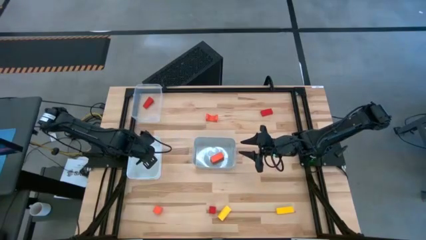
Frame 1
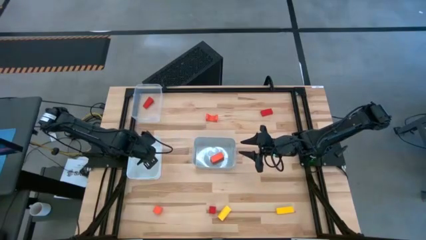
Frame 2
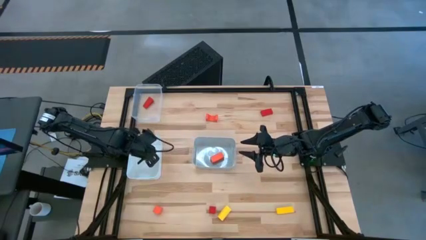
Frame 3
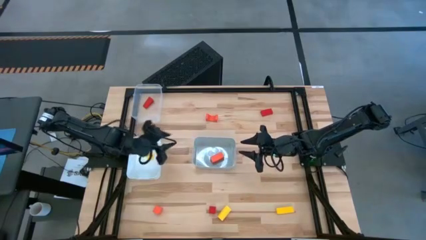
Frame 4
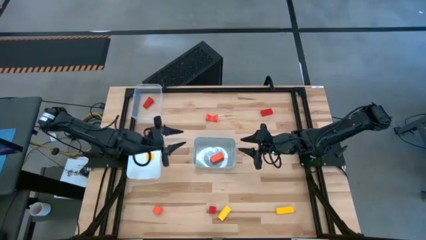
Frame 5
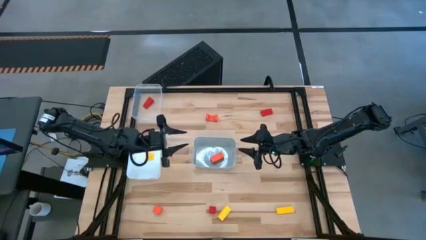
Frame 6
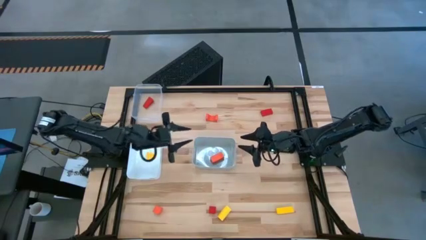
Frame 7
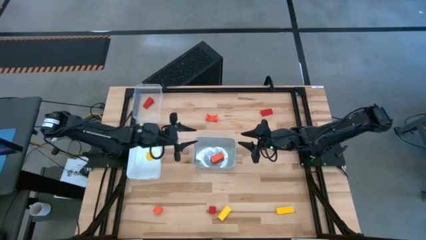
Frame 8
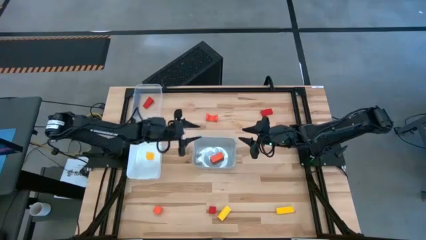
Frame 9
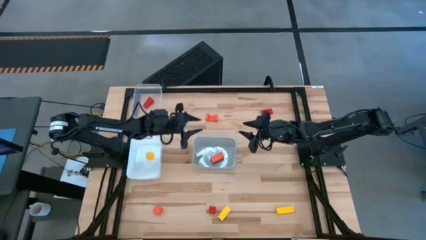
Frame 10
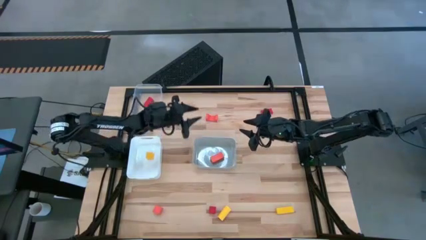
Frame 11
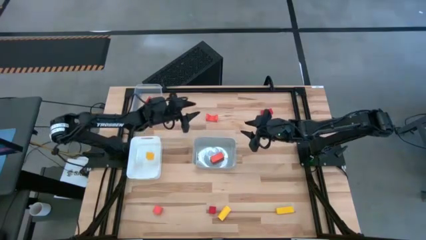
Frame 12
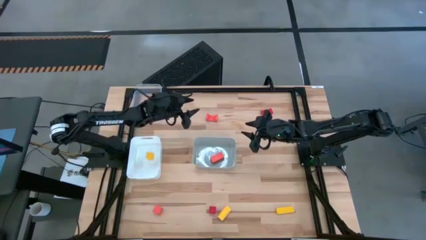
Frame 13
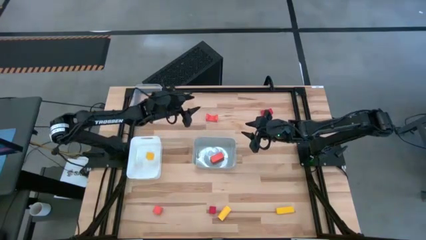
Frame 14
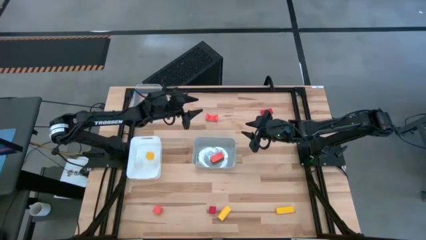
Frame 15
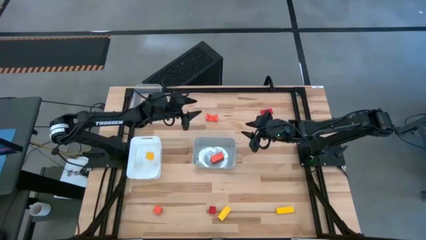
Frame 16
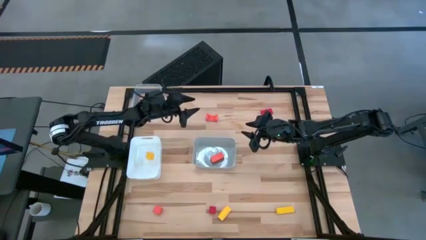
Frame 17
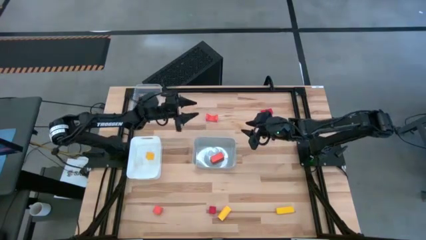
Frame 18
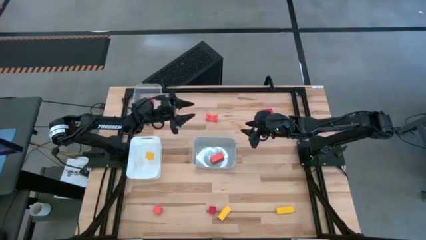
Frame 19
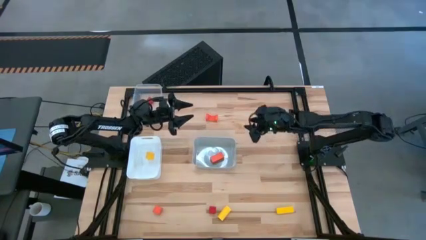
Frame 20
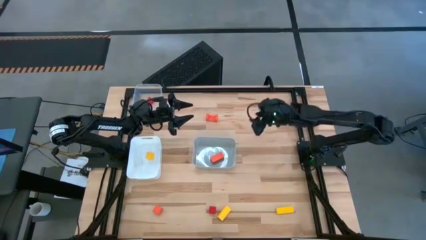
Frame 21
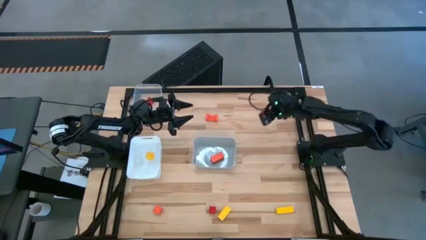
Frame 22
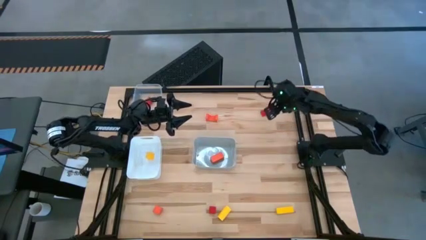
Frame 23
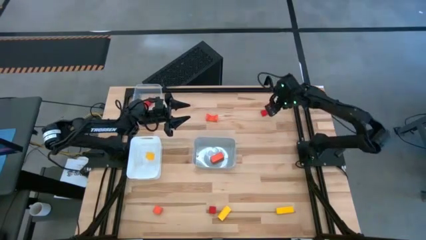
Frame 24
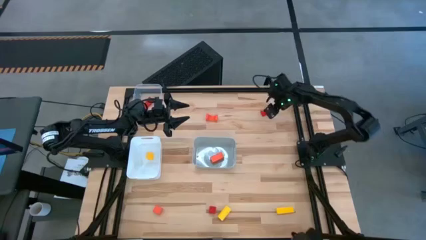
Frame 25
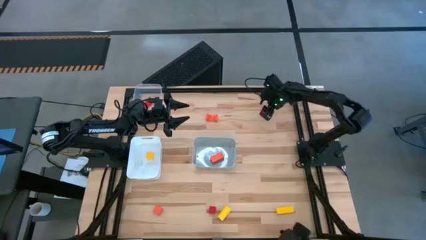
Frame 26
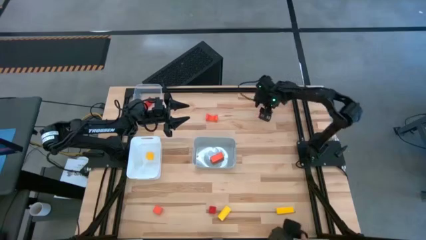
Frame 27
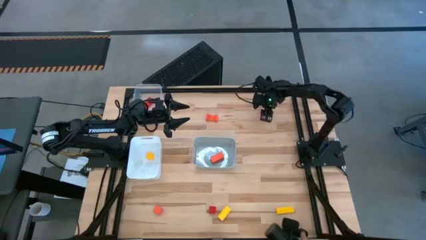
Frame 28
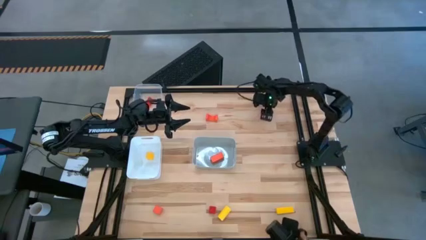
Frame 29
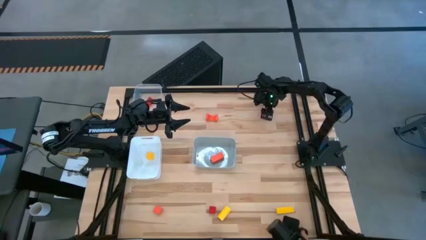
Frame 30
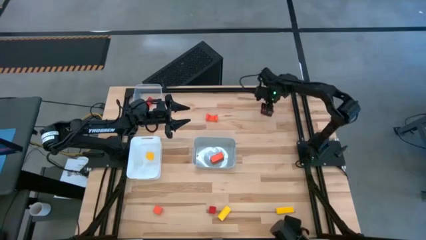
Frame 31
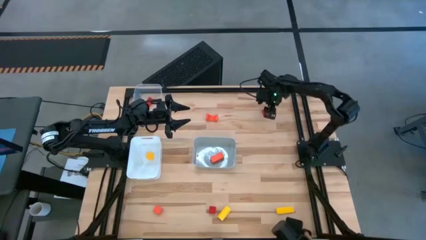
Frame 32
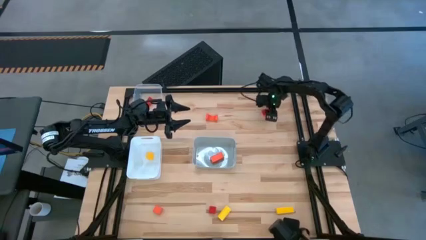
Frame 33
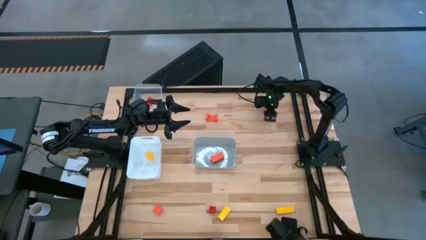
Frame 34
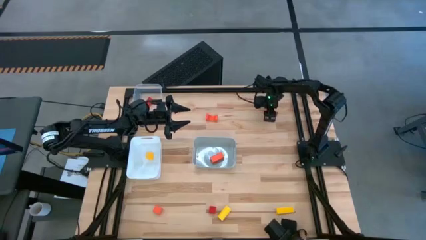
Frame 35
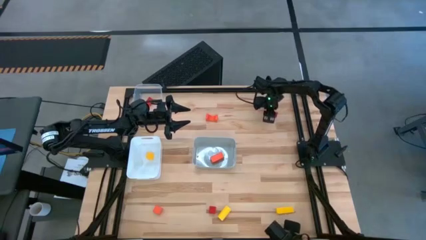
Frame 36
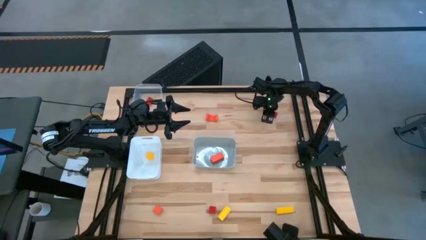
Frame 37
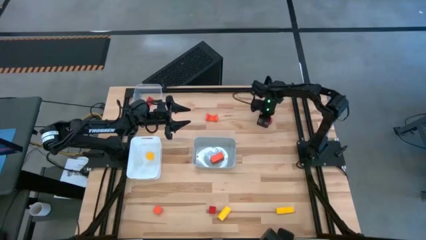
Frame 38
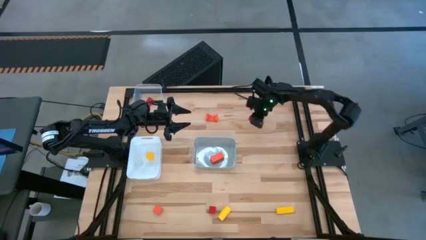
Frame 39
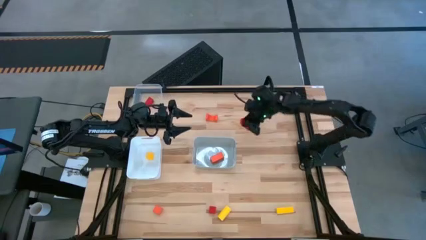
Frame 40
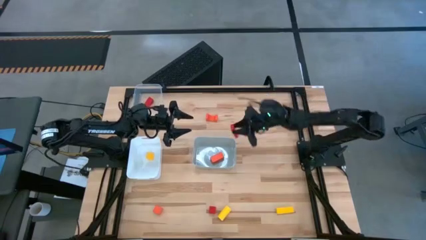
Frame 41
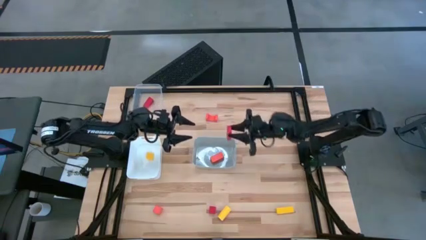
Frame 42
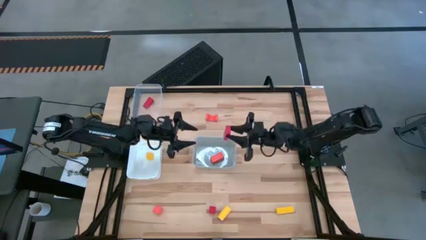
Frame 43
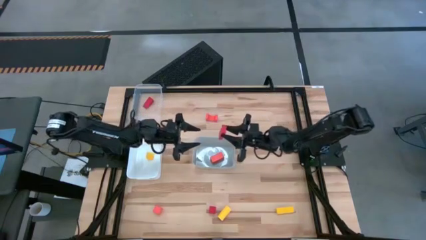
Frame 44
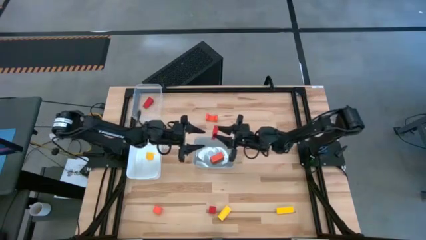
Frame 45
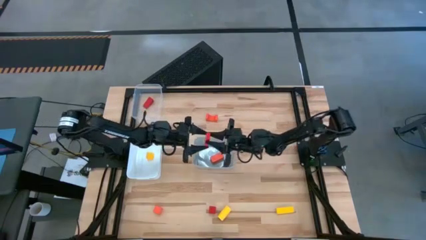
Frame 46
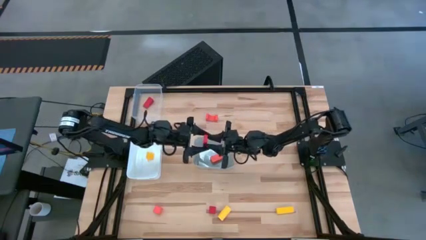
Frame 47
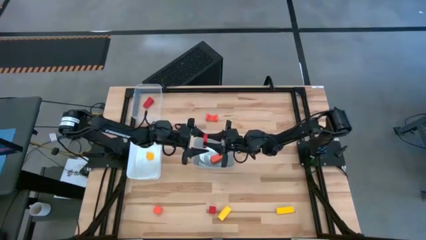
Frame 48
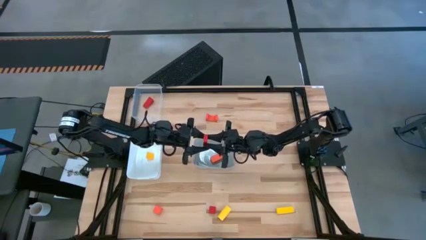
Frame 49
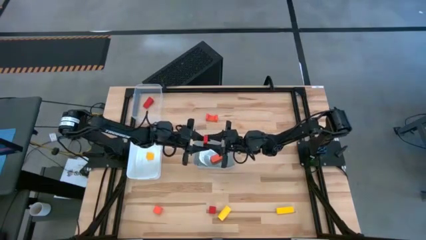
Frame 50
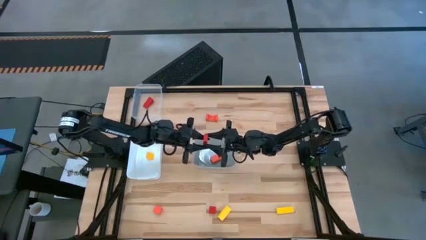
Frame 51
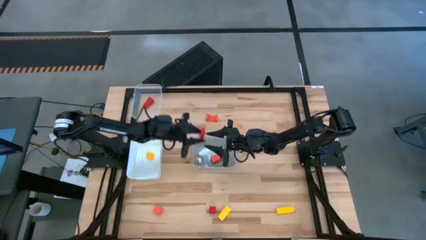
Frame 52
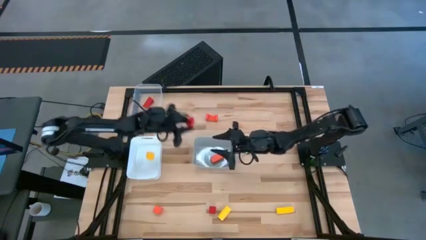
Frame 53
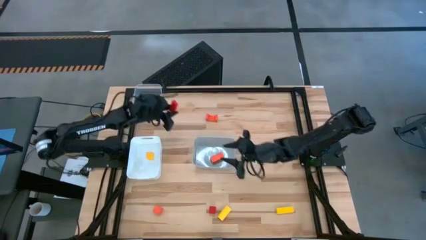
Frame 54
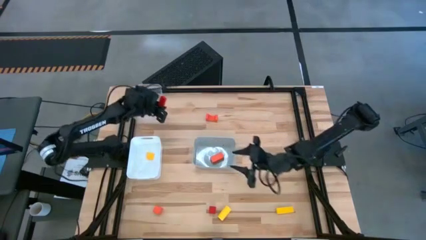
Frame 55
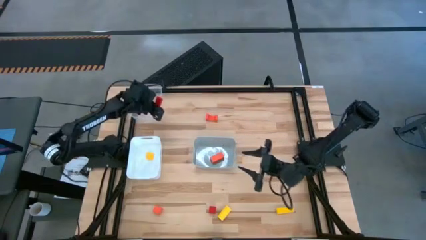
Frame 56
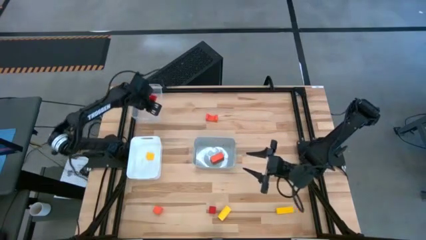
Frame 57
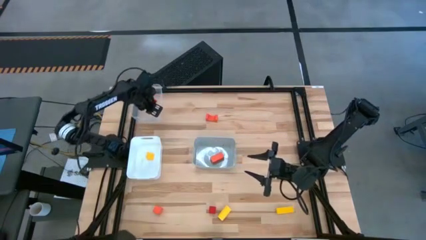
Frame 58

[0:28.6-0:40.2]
Task: Sort & place blocks by color
Put the top red wooden block into the transparent bin
